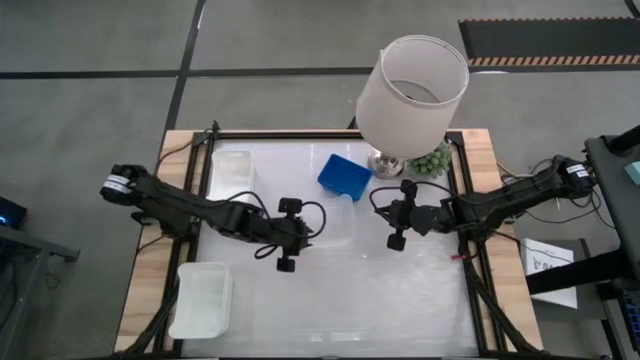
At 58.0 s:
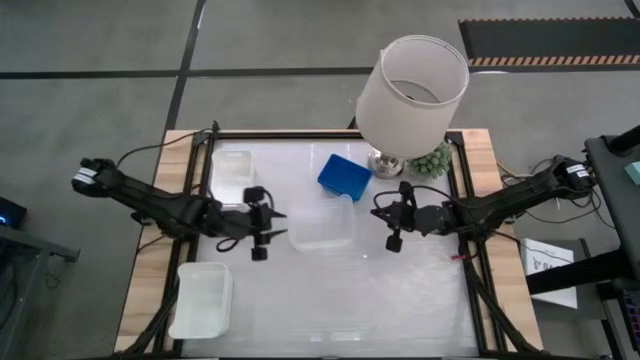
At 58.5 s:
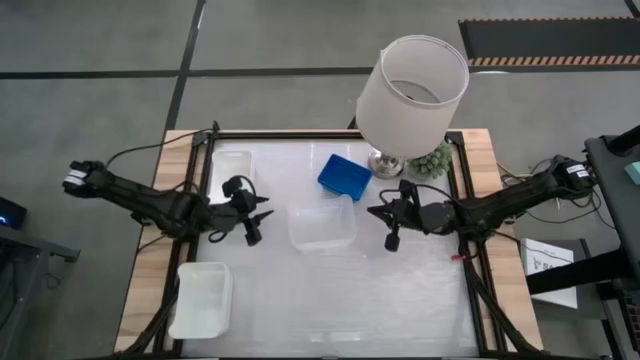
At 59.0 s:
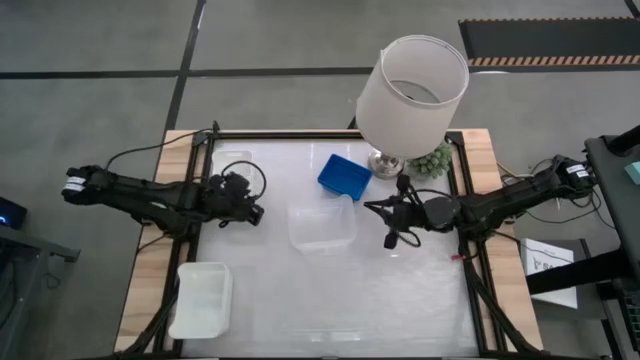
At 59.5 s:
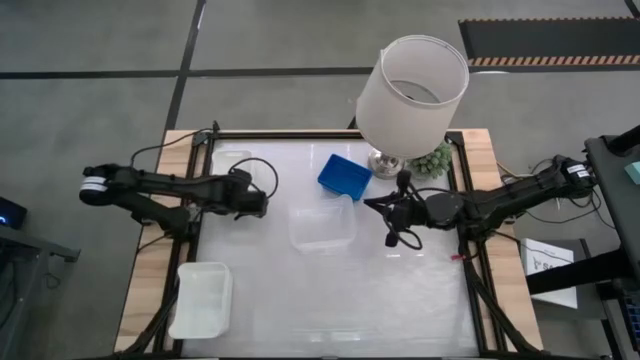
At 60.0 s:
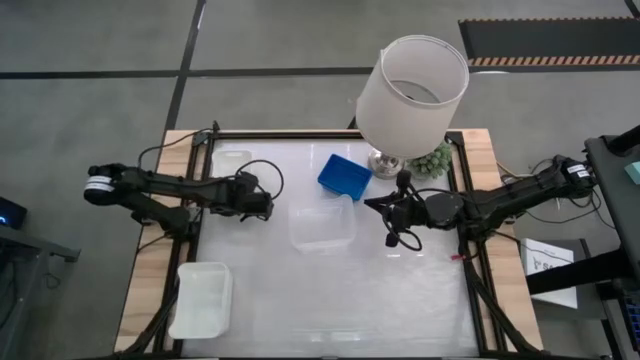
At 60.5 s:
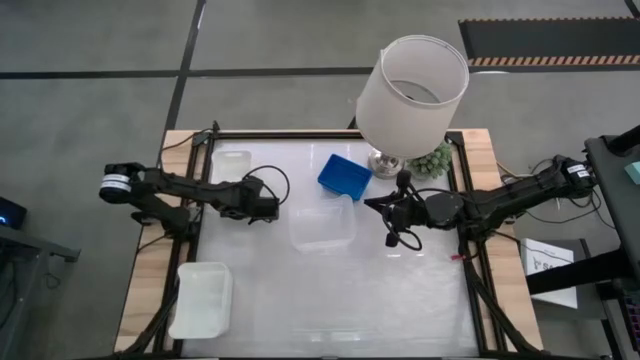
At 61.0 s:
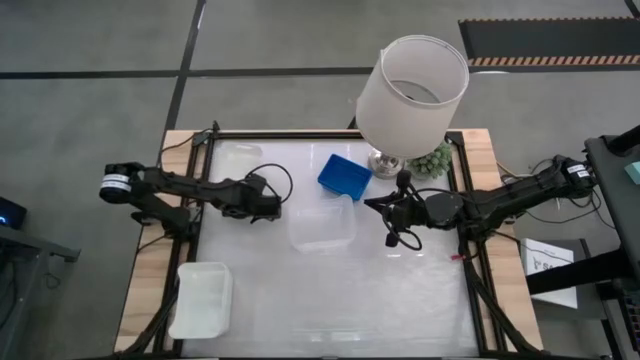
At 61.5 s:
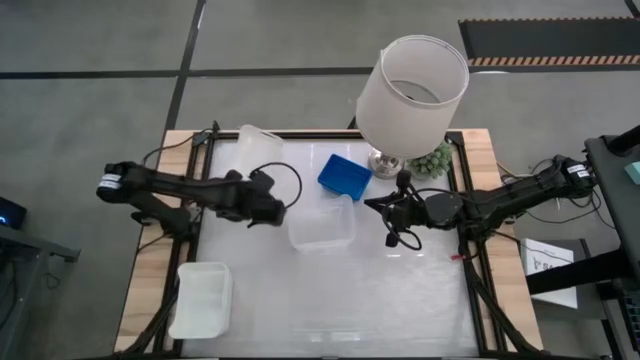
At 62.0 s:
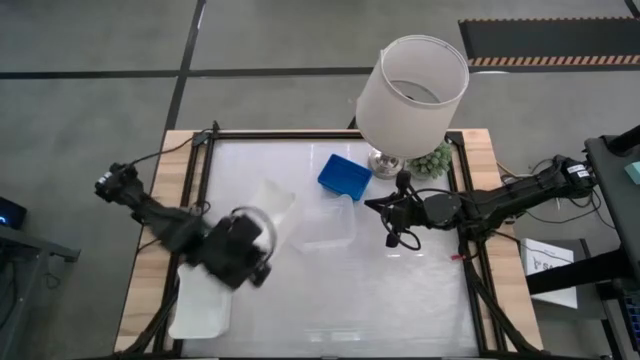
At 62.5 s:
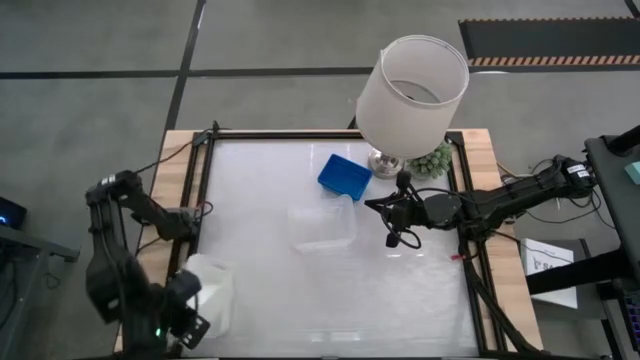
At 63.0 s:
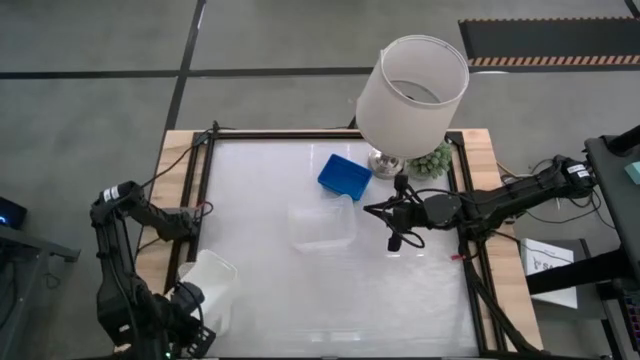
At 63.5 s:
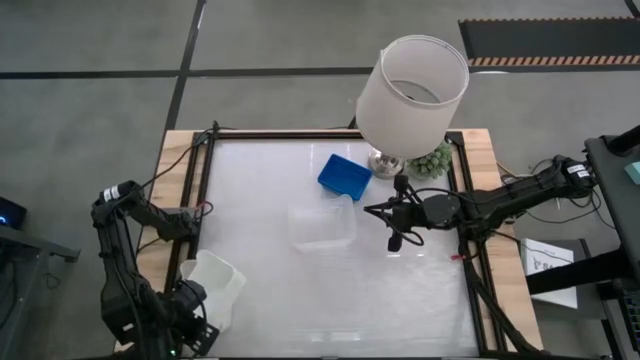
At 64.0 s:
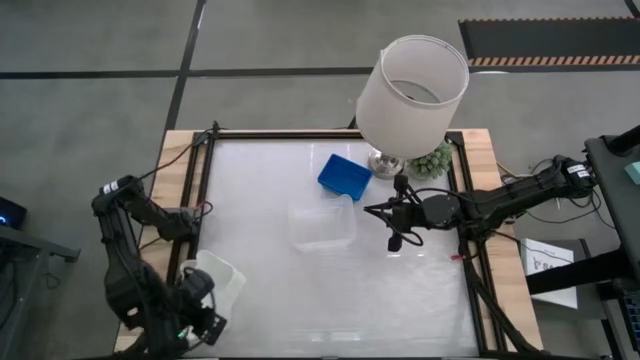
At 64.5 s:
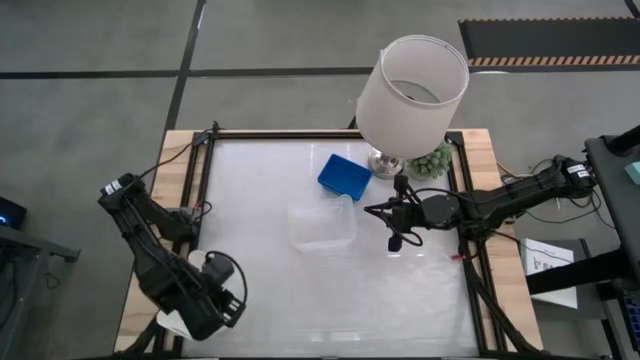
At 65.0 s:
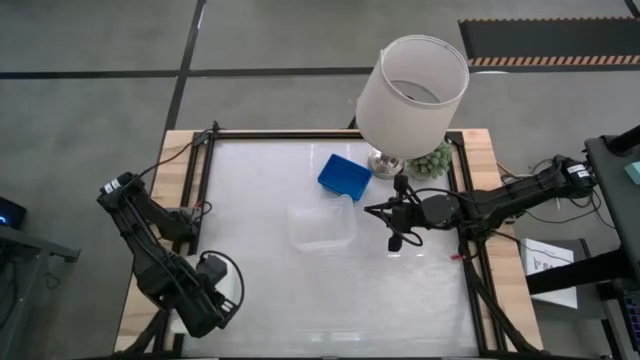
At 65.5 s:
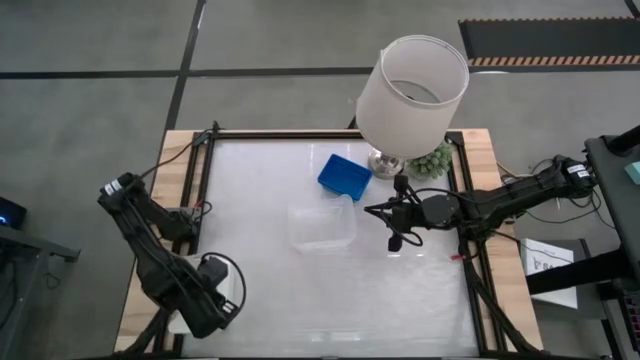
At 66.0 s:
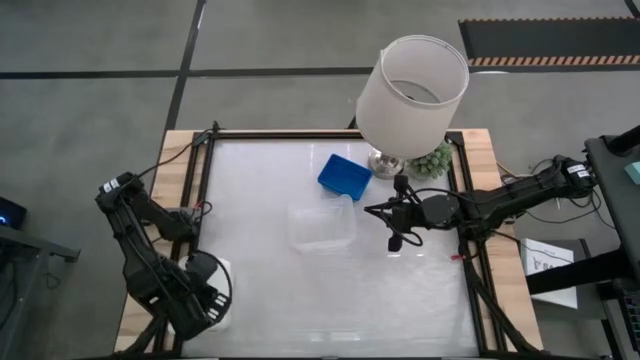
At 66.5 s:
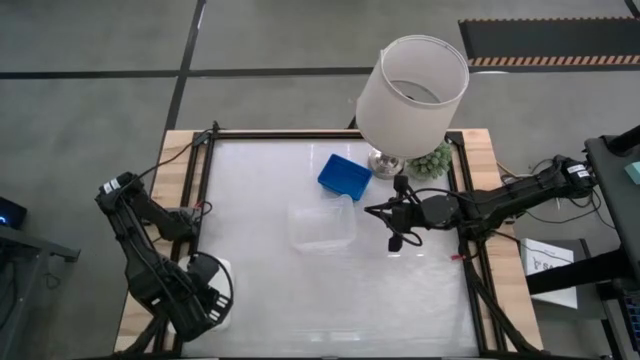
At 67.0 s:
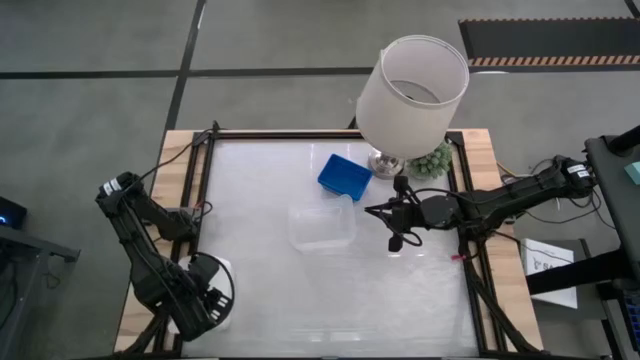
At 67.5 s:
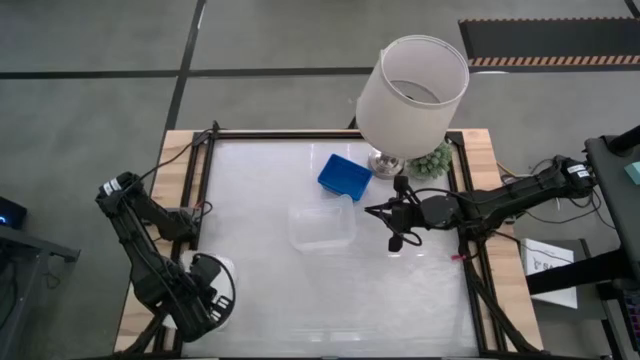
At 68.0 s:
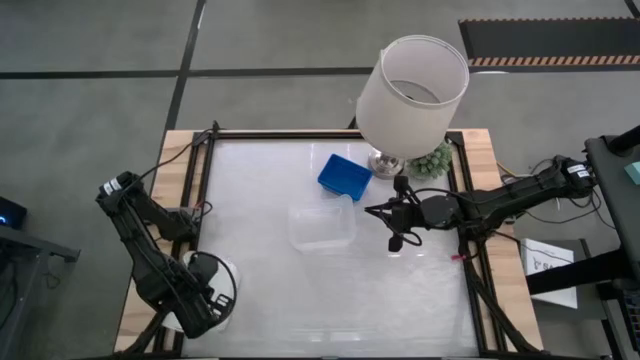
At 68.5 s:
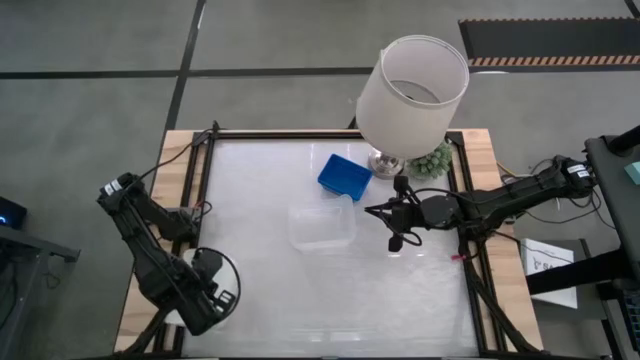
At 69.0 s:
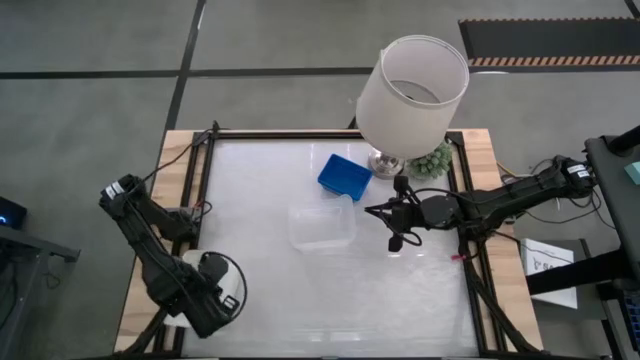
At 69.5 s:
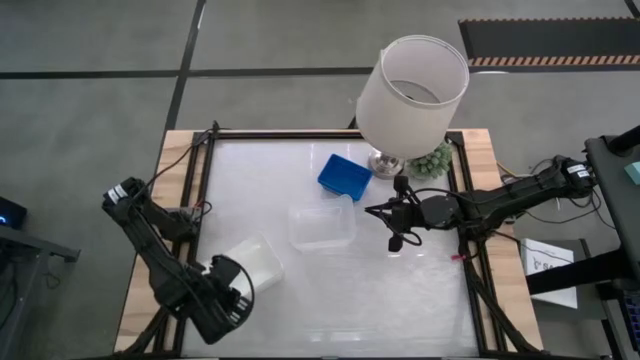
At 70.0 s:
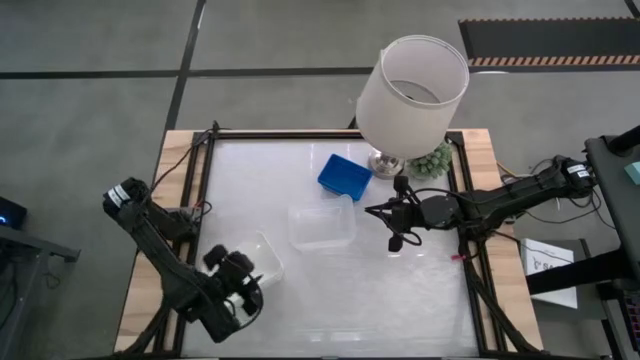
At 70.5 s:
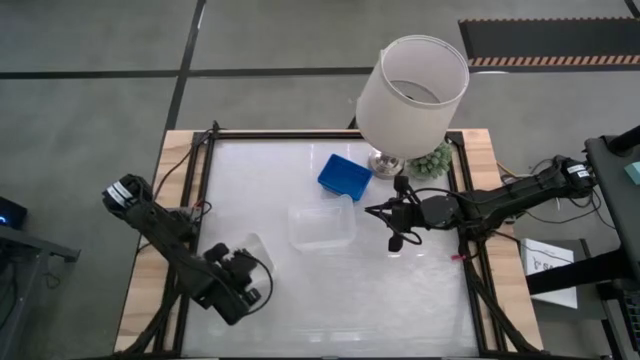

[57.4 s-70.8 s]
Stack the top white bin on top of the bottom white bin

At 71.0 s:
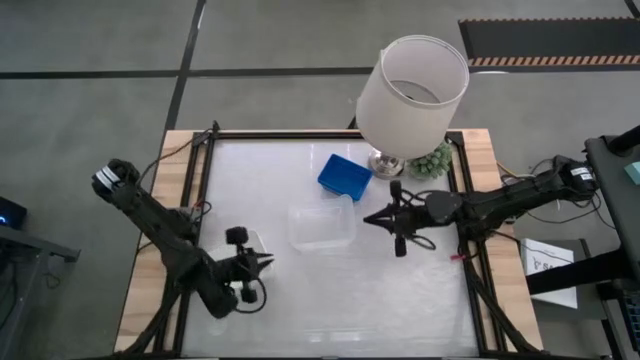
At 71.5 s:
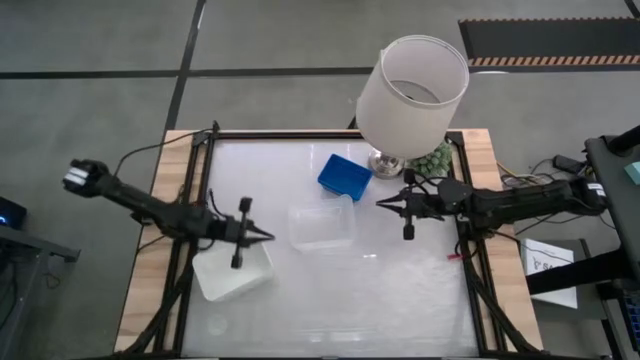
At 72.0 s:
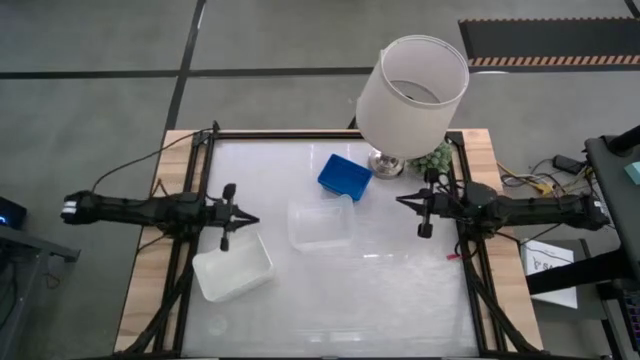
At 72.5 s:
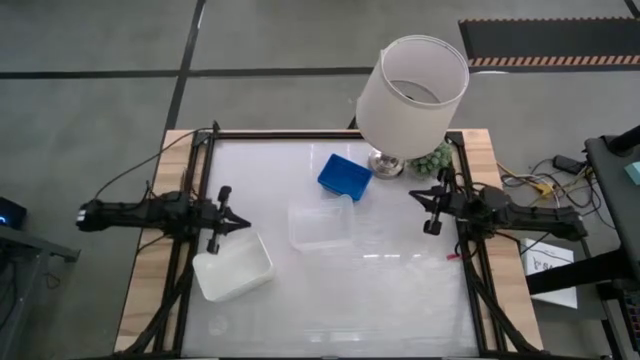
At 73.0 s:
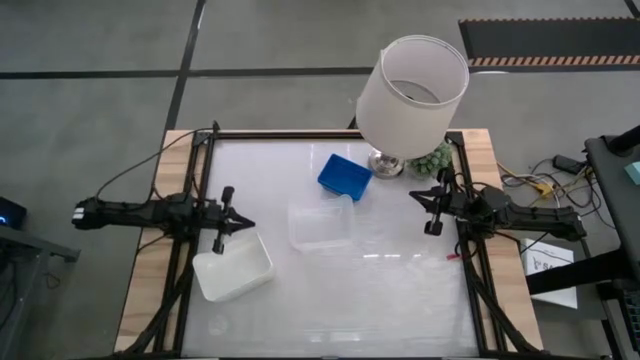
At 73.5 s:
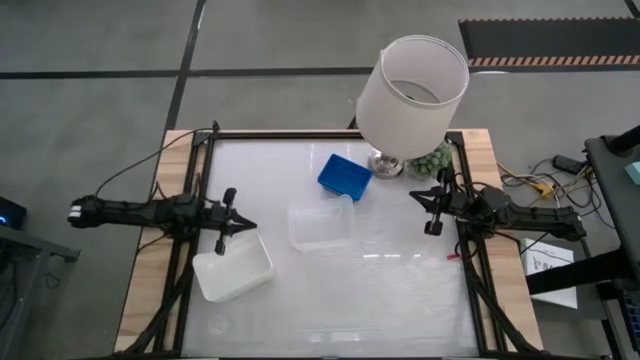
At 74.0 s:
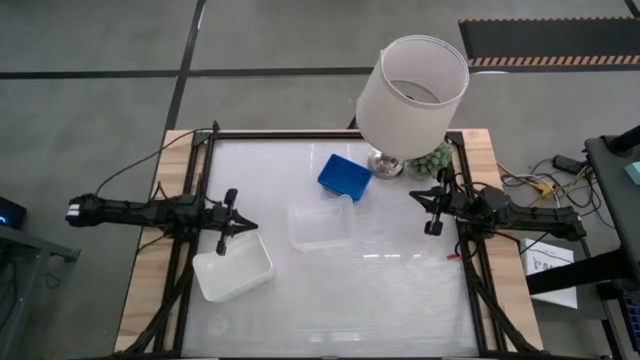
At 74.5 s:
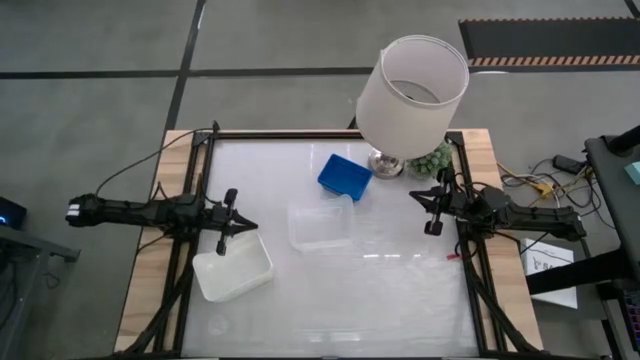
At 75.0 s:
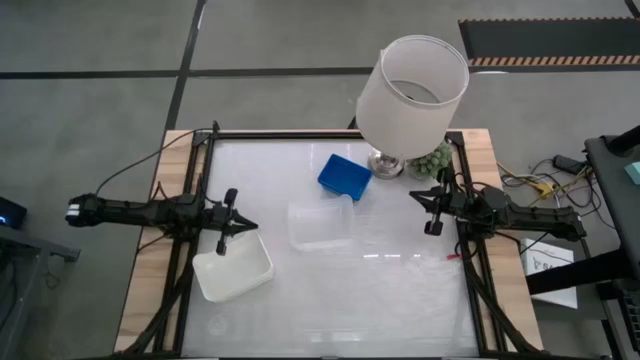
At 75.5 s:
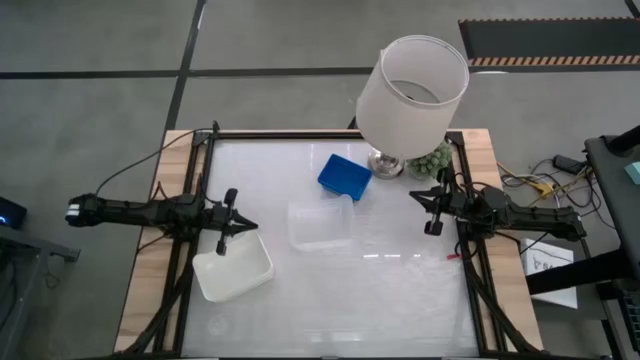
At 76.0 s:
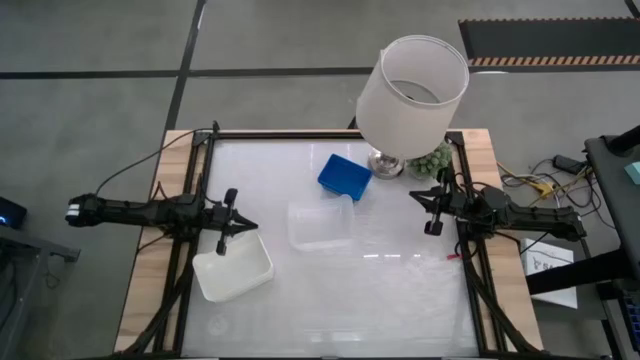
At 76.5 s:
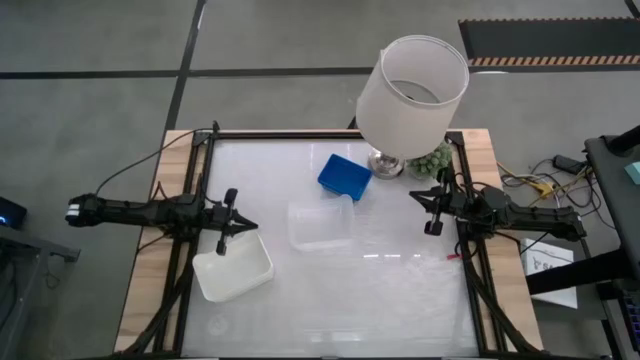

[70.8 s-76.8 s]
Return to Home Position
